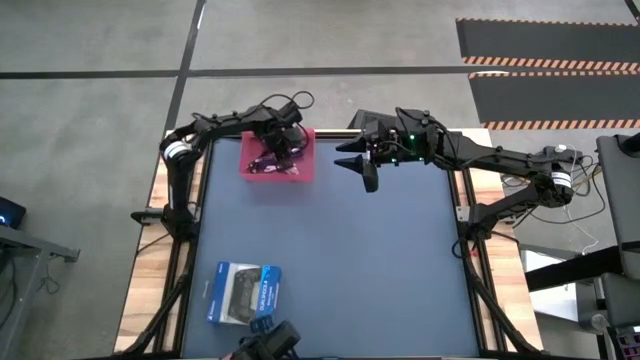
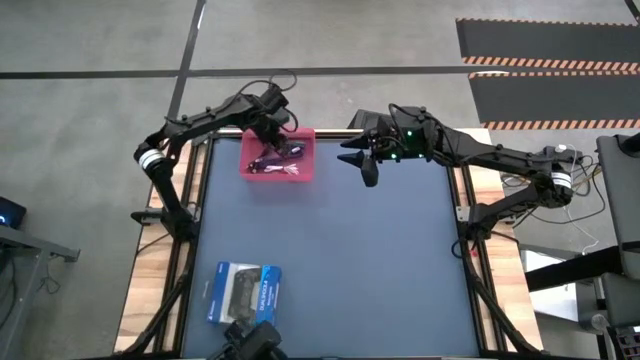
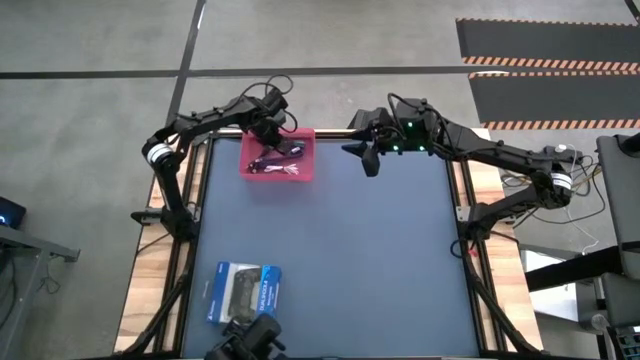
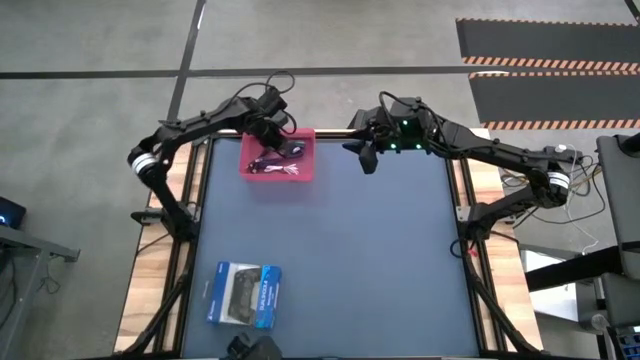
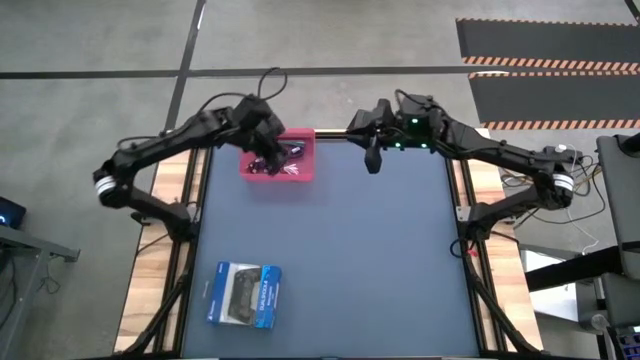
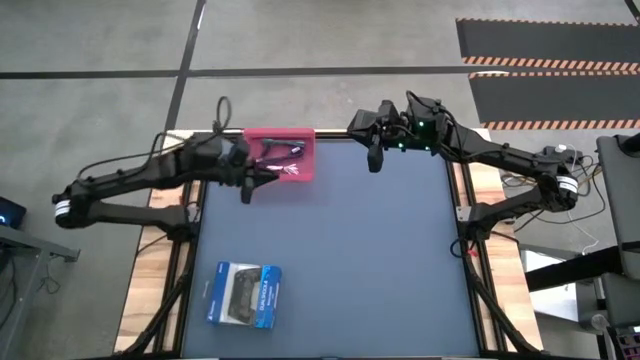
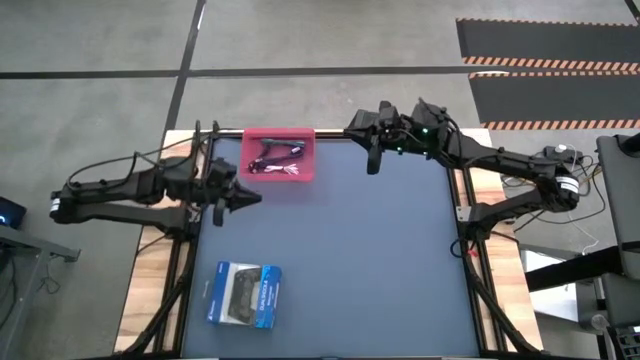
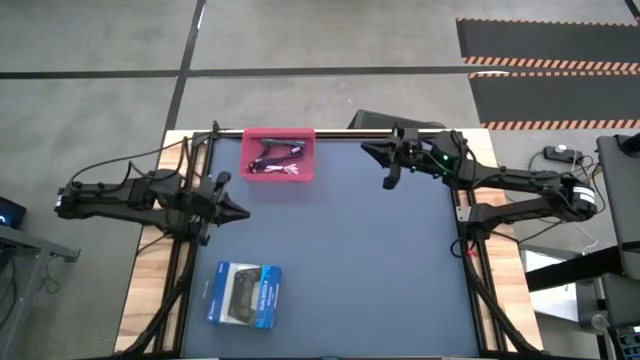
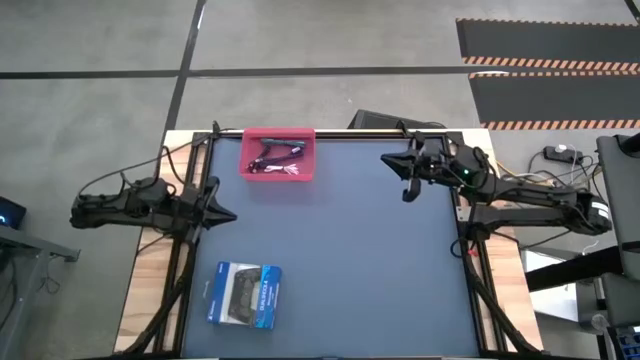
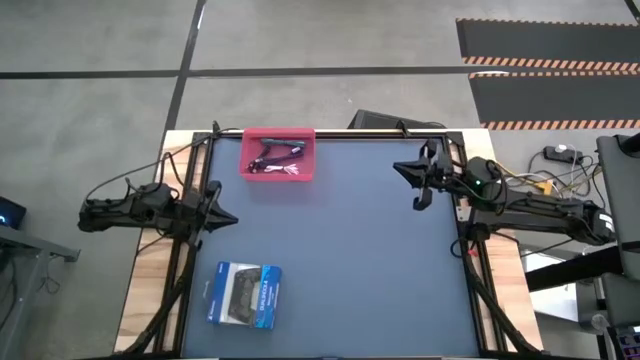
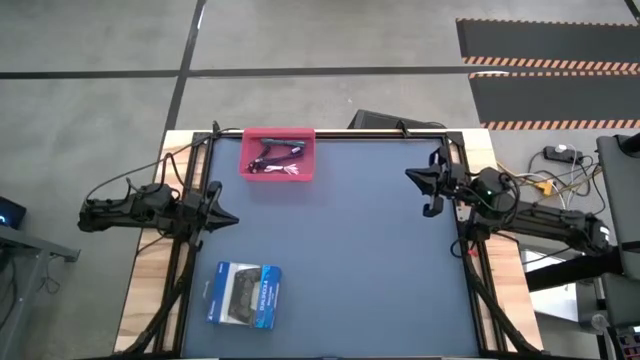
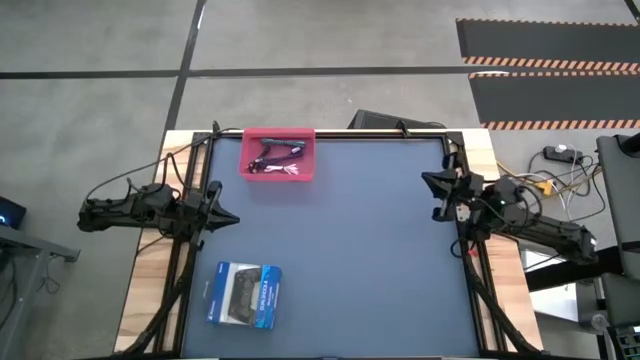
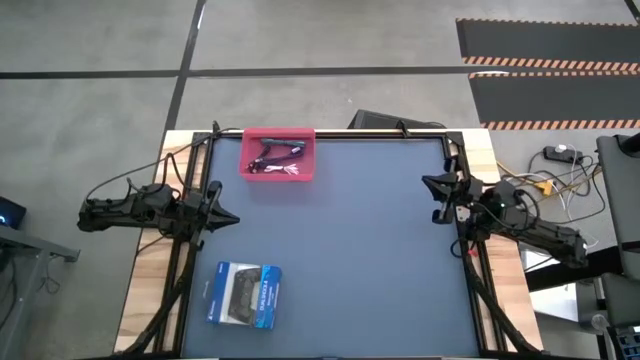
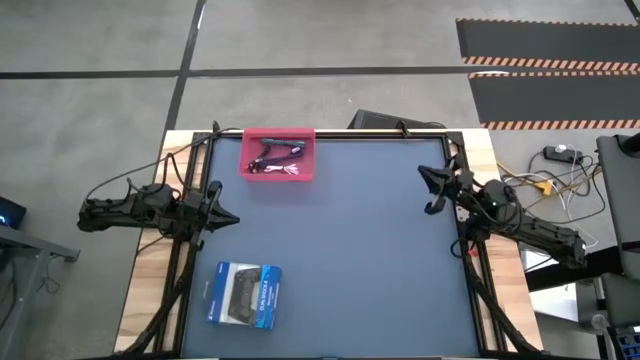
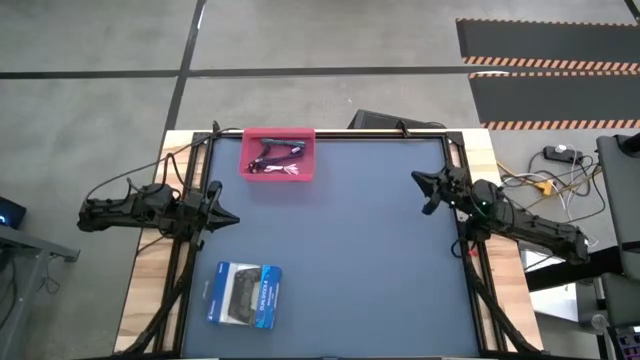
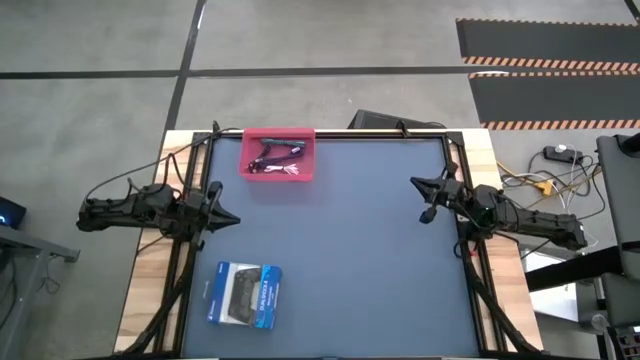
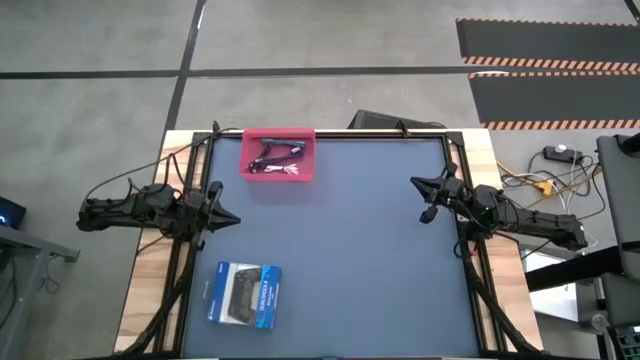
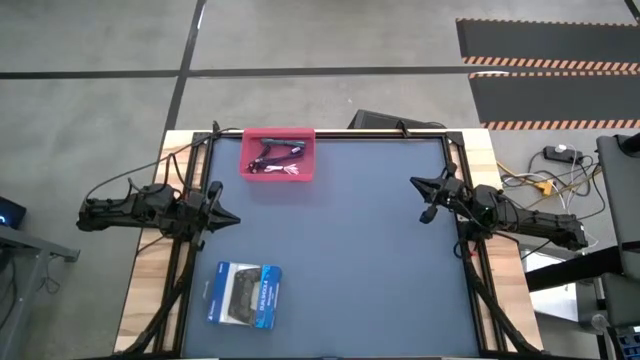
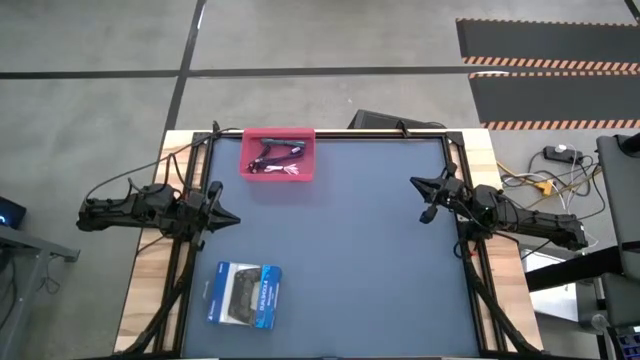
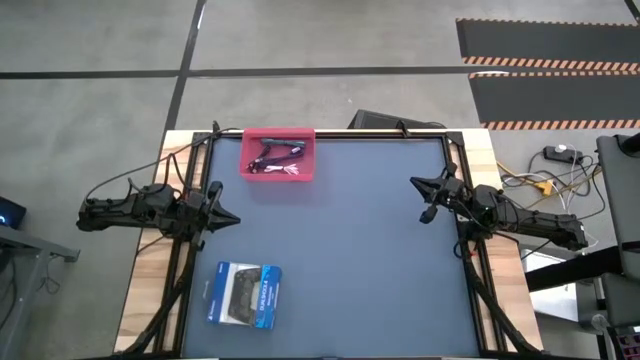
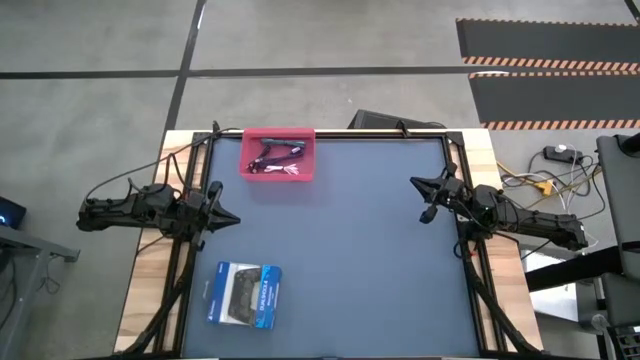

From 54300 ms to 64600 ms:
Task: Pick and place USB-C Cables
Return to Home Position

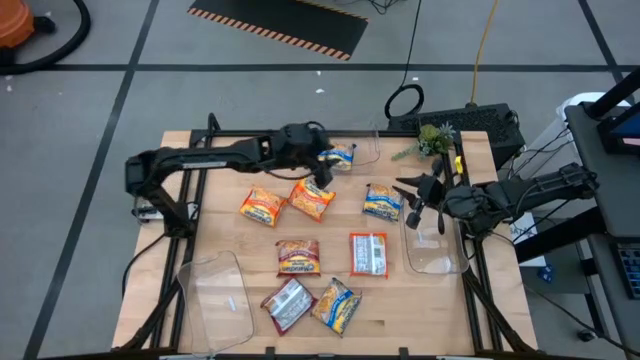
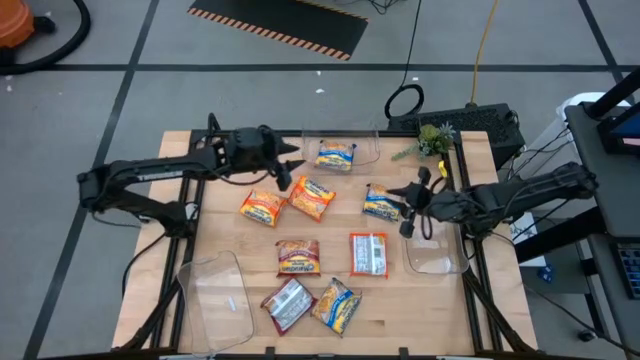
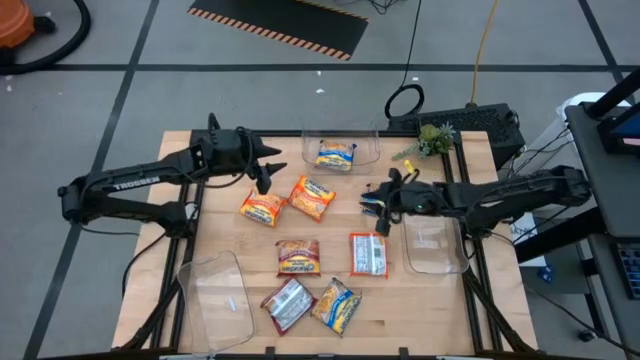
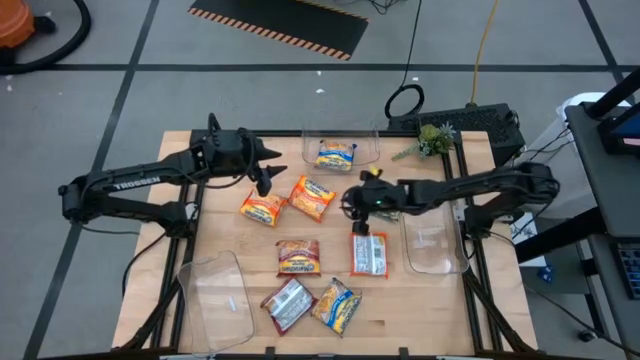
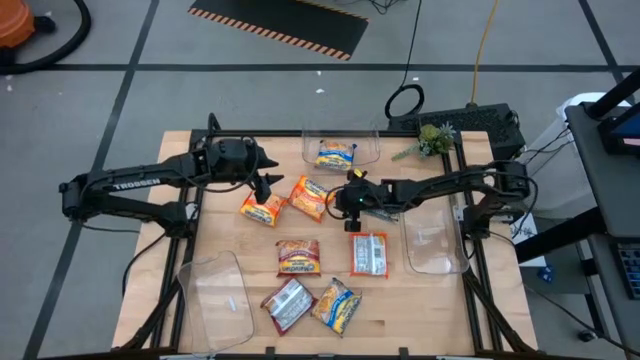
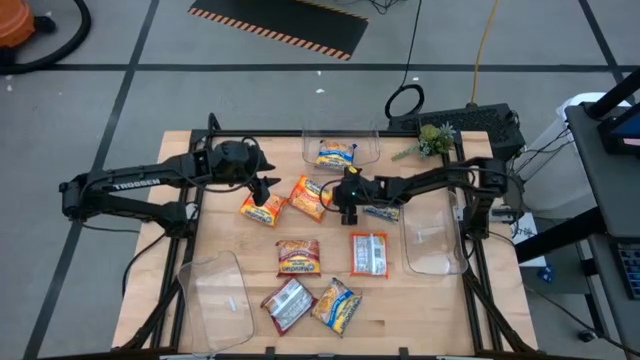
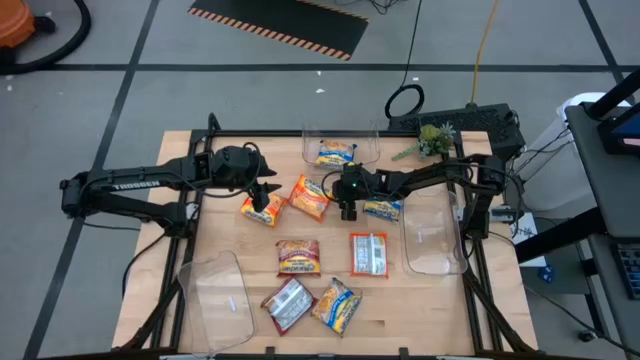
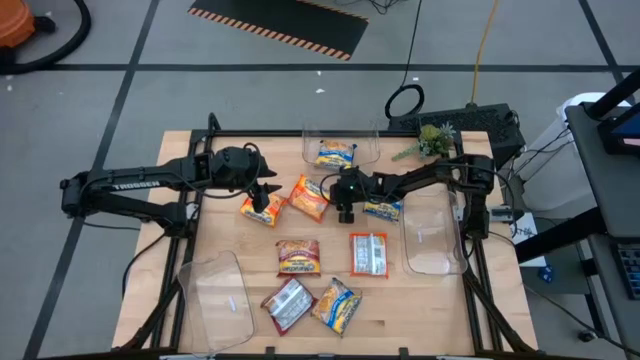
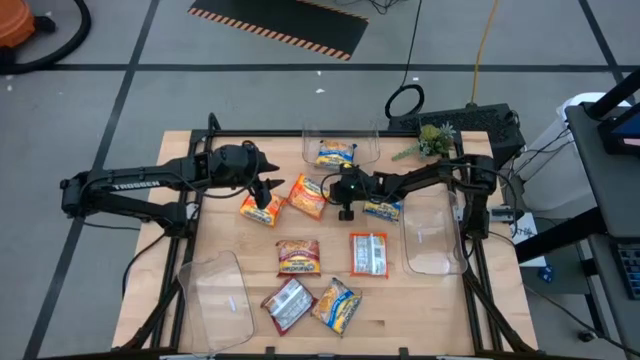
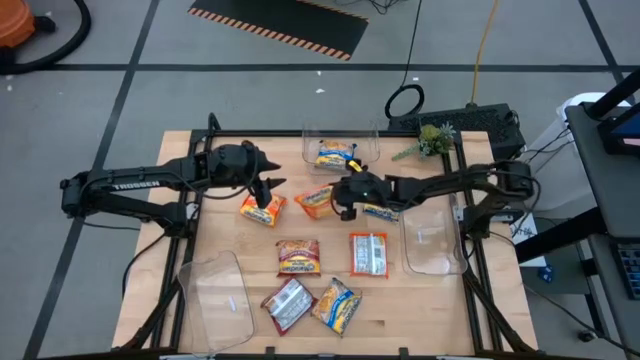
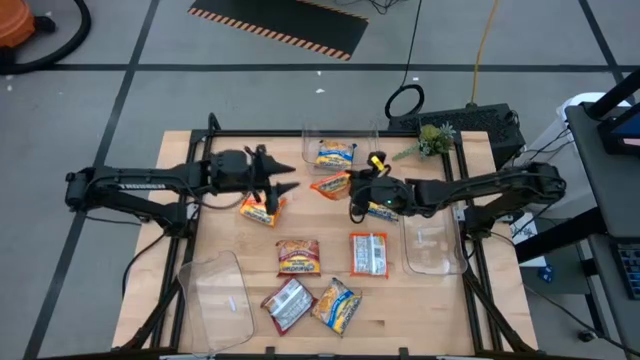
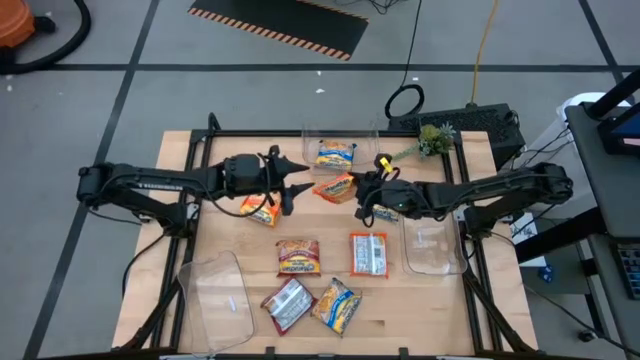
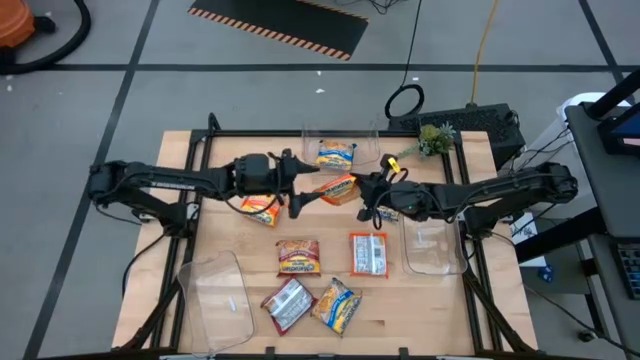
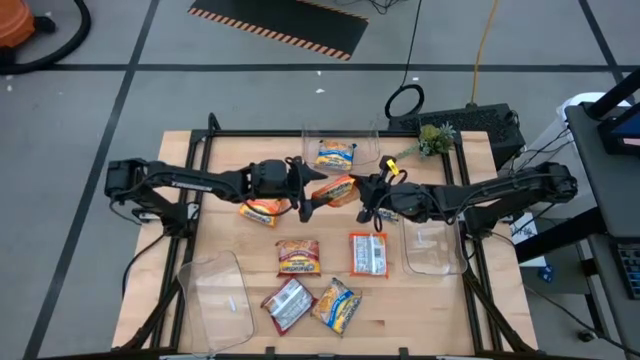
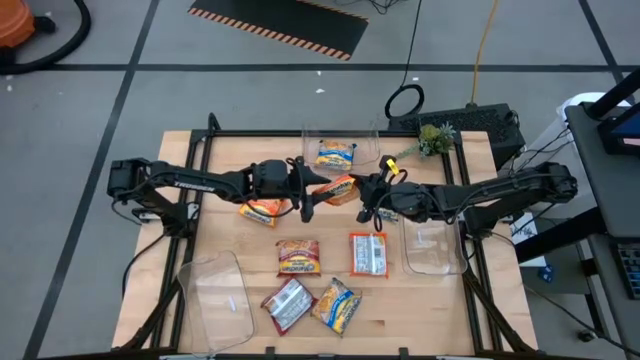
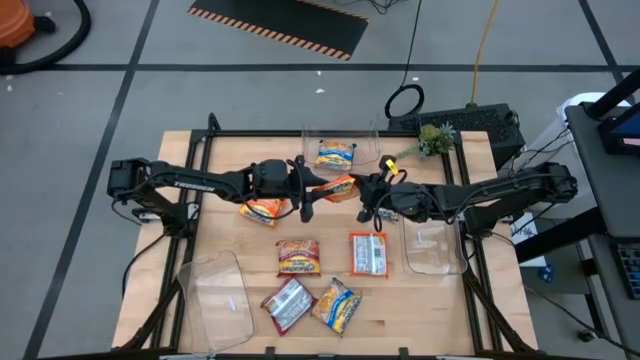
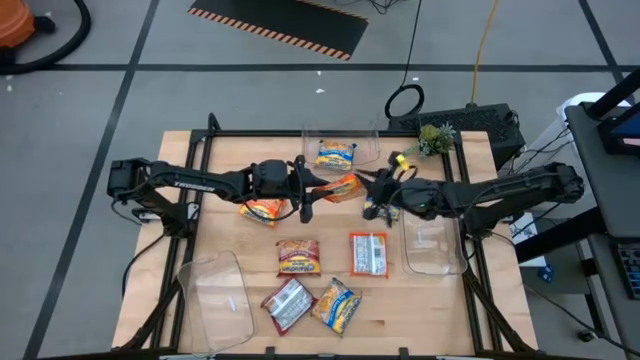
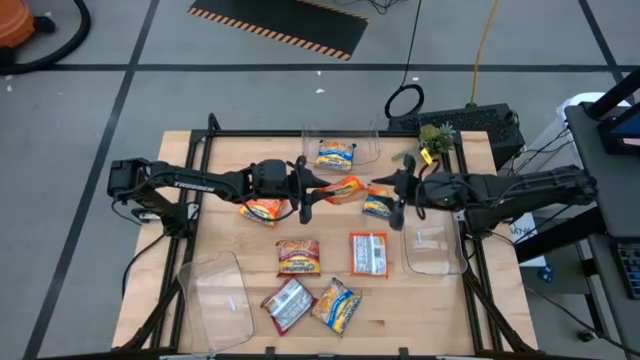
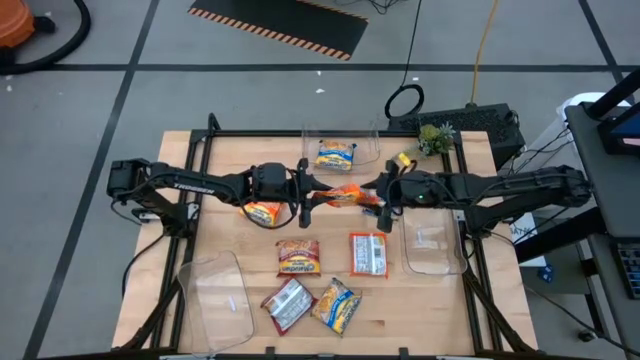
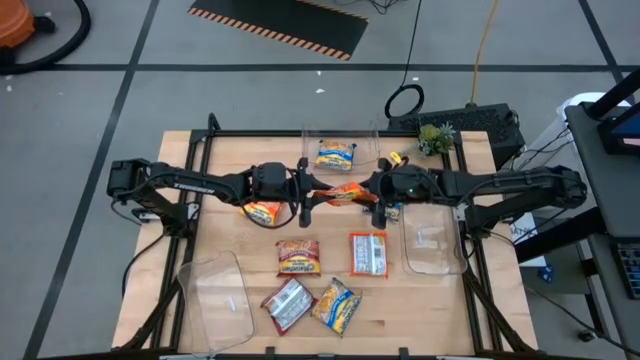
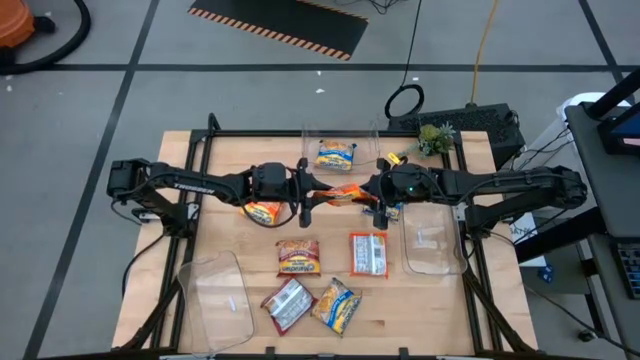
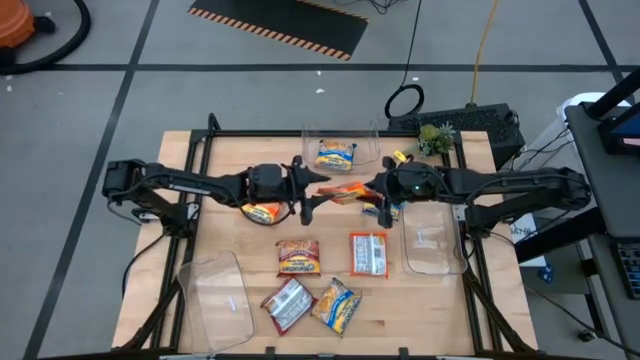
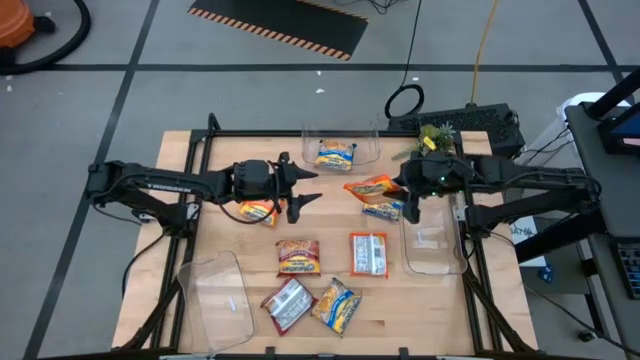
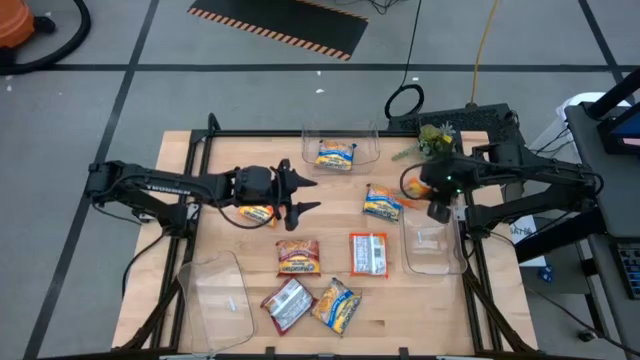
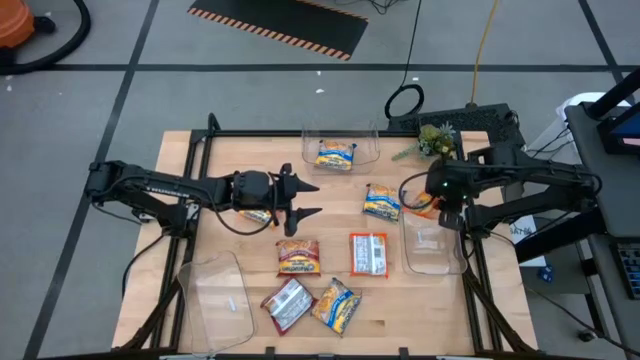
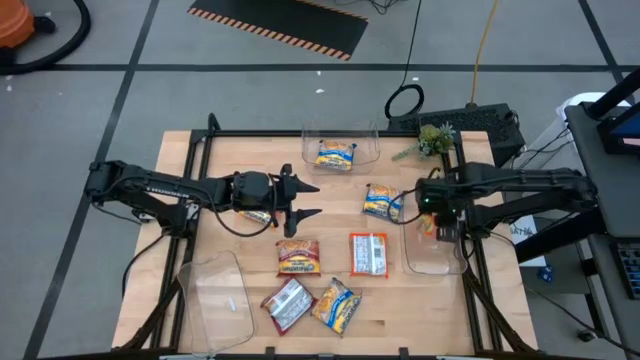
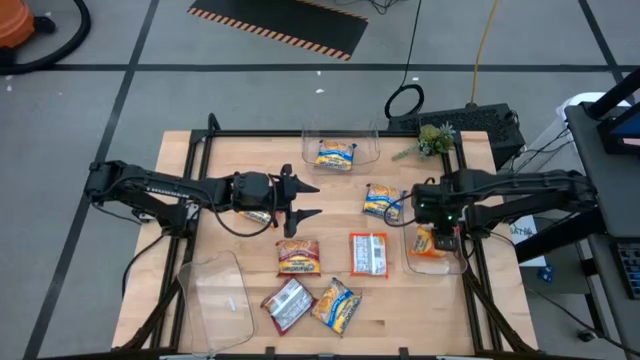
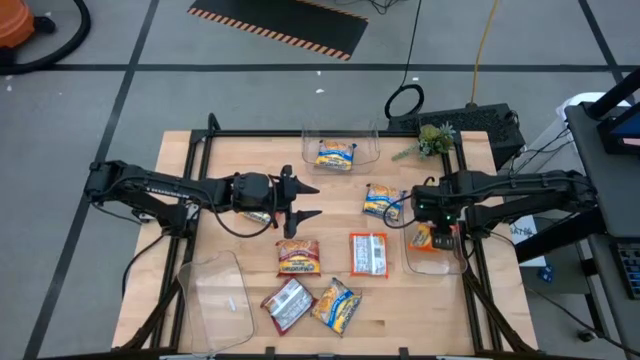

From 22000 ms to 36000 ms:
Task: Sort Maruchan noodles
Put the middle orange noodle pack into the right transparent bin
